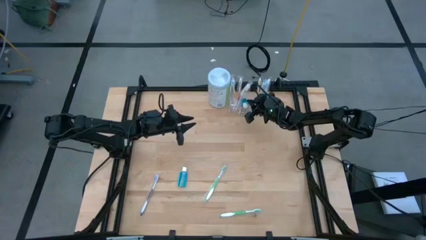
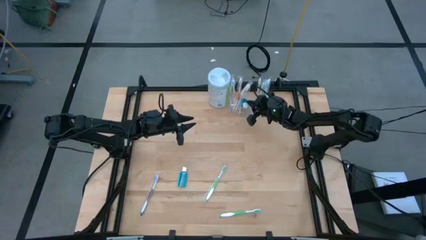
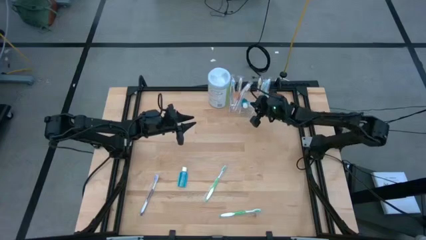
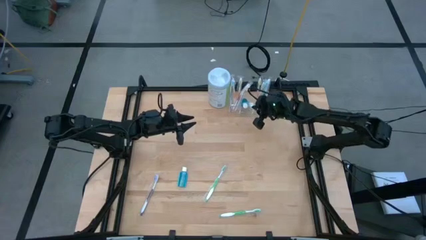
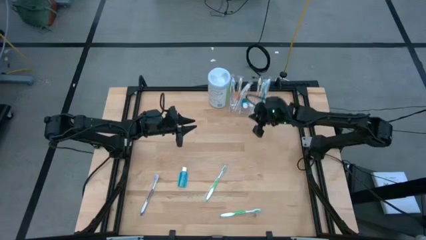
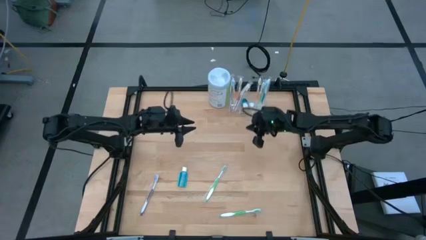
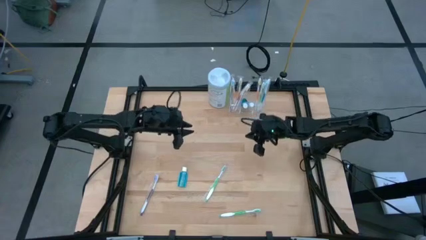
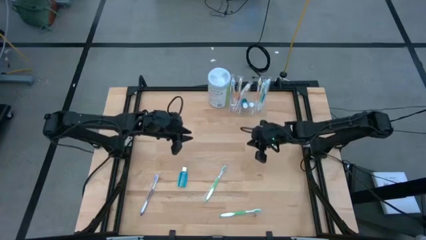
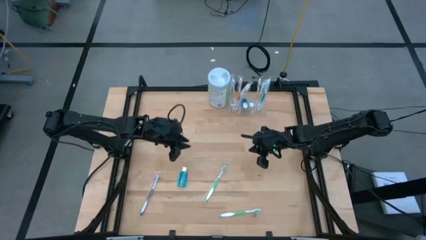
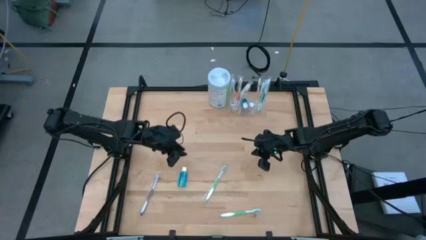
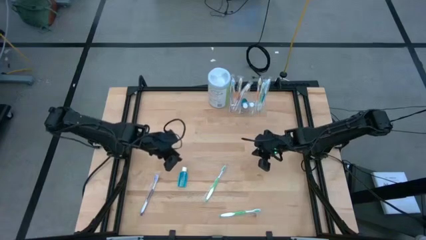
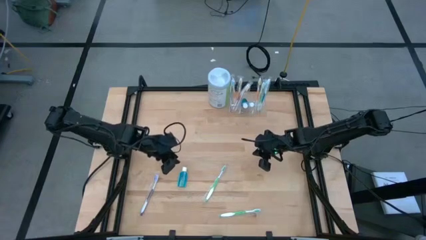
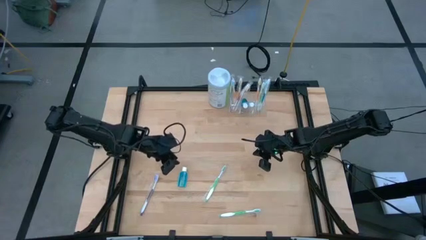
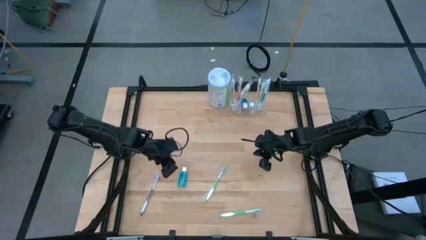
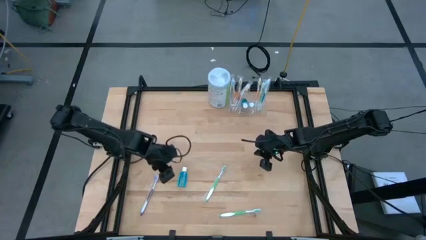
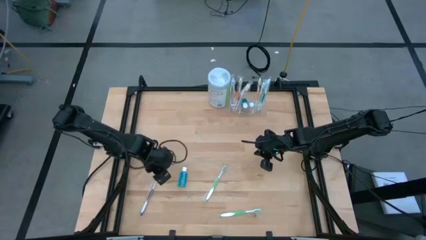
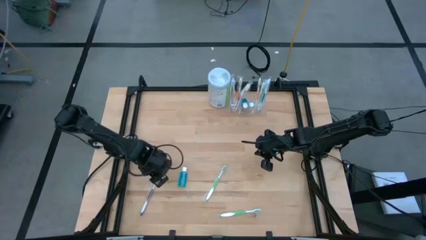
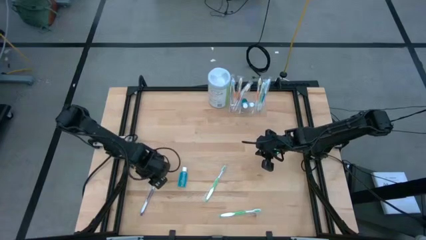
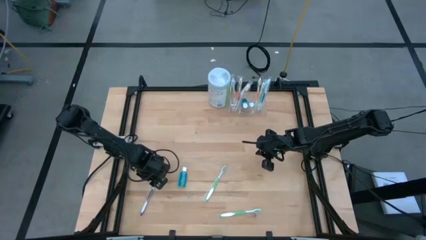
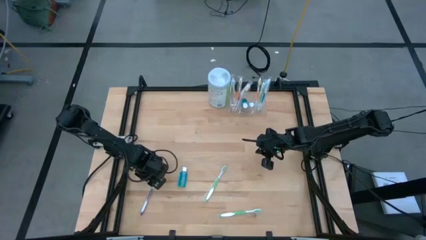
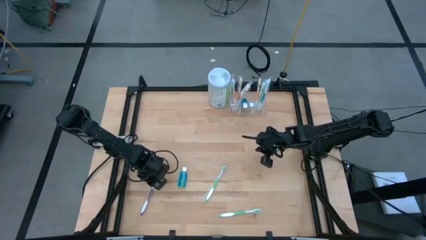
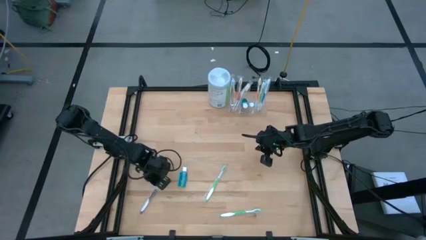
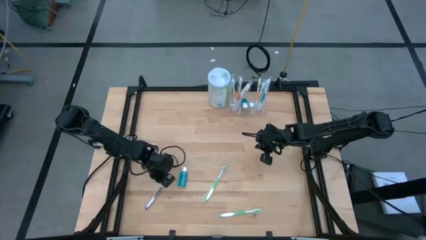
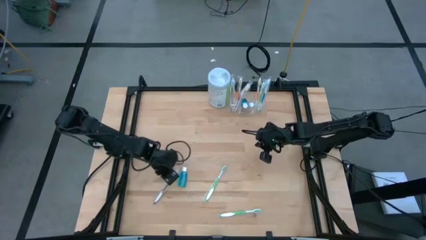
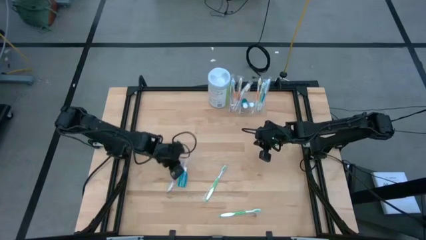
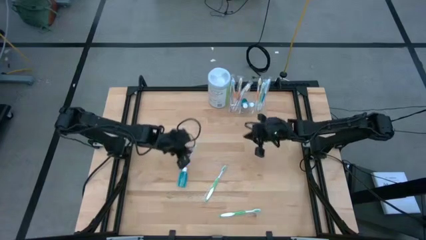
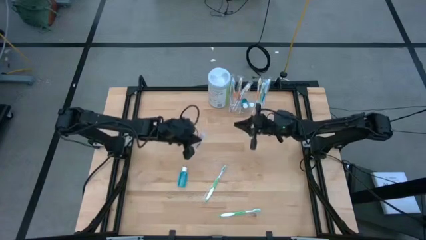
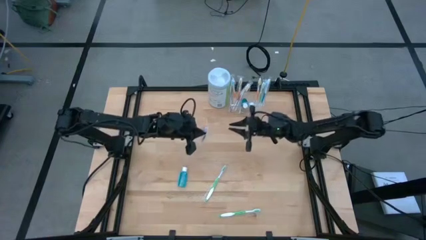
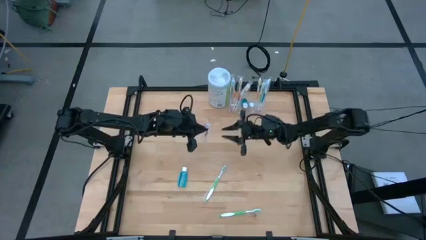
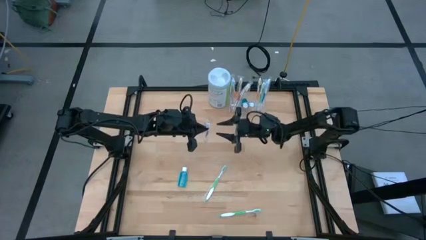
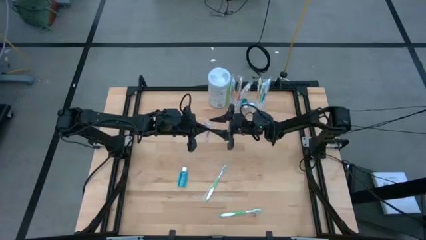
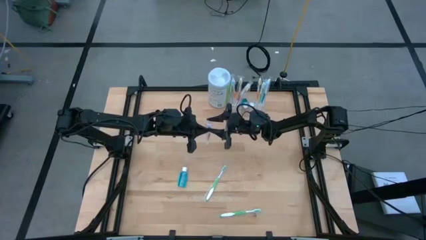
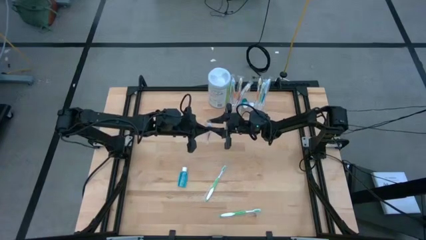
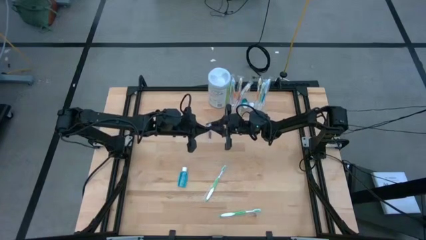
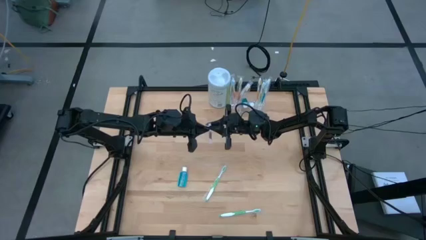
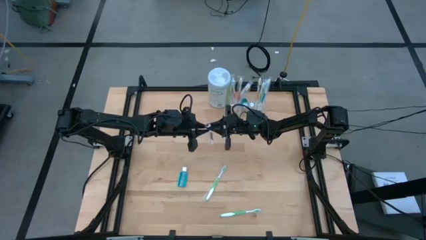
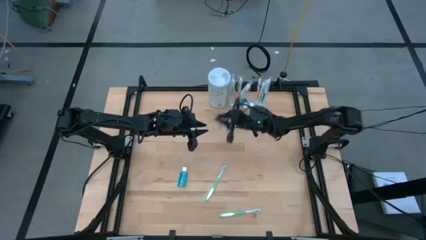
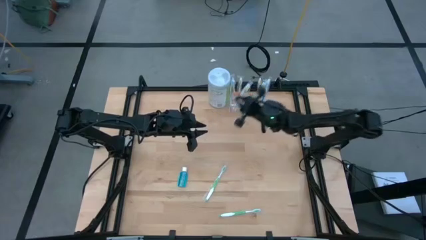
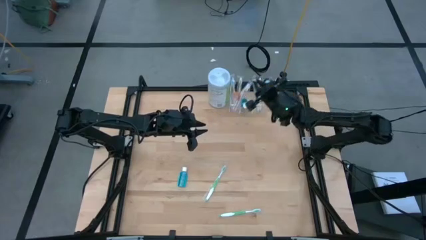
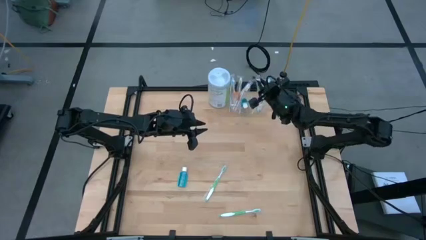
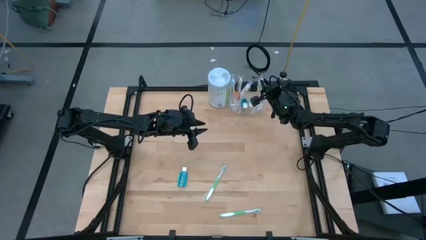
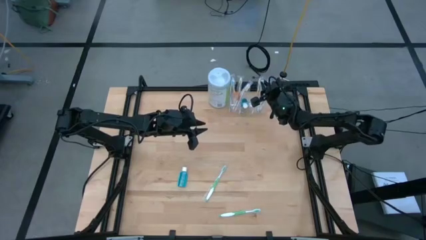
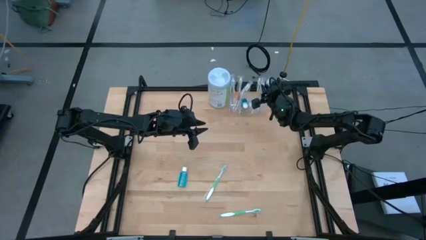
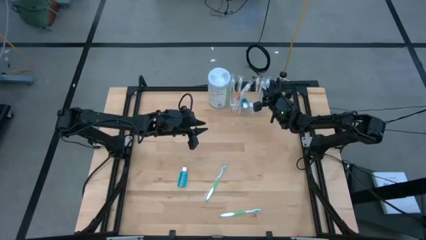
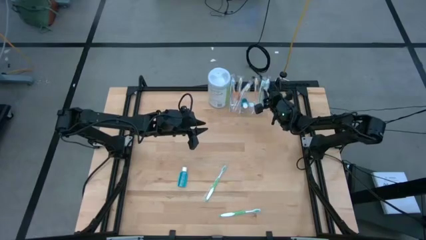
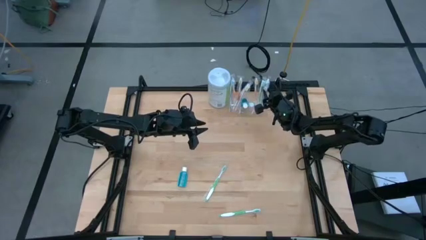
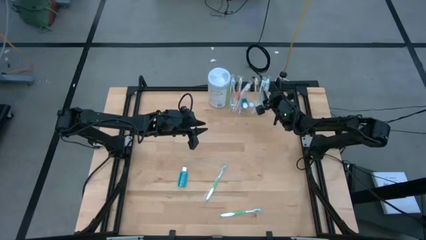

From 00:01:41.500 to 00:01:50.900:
Task: Pick & Place toothbrushing station
Put the purple toothbrush into the transparent organizer

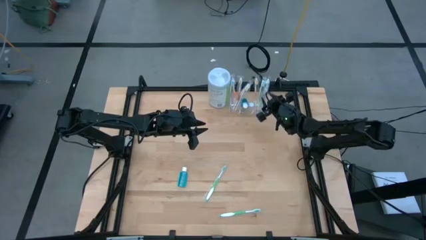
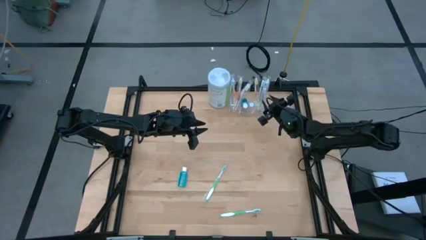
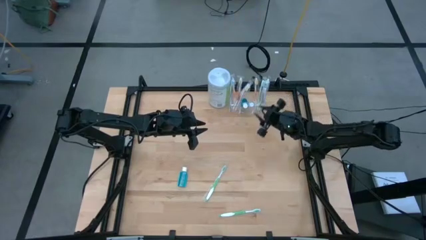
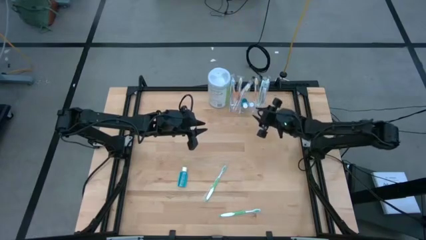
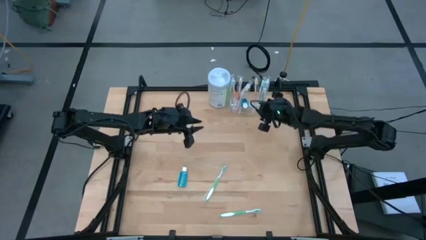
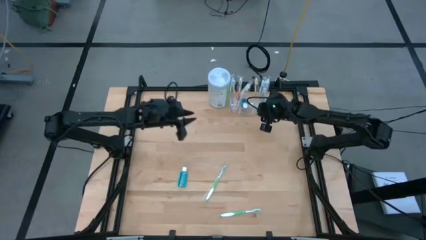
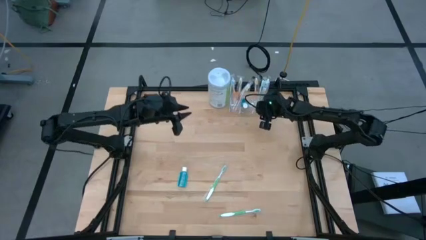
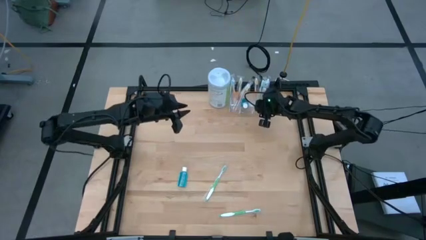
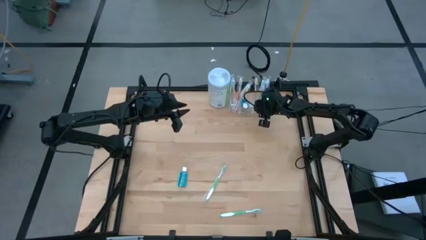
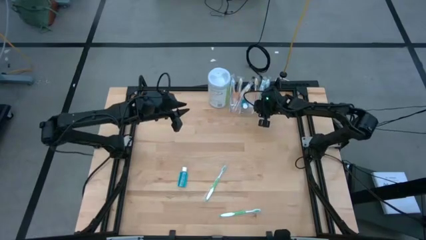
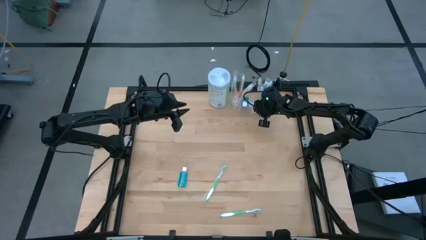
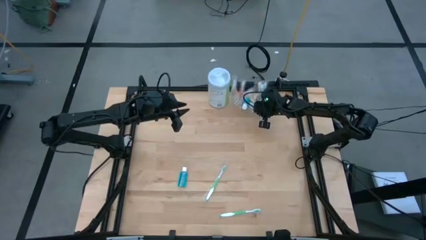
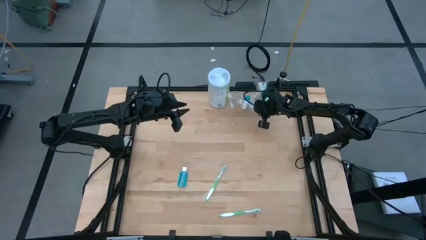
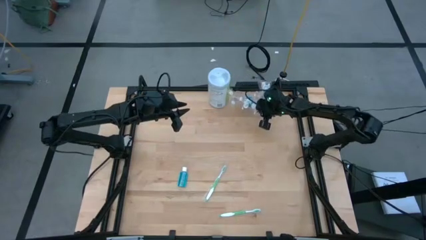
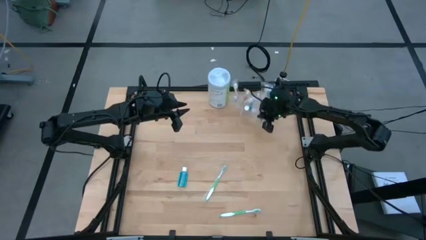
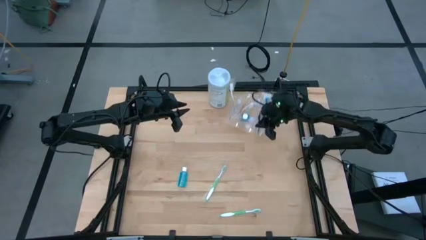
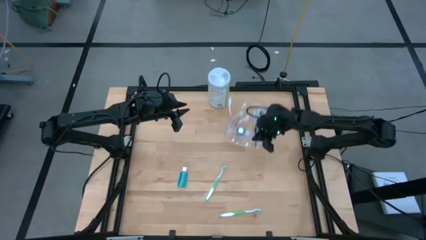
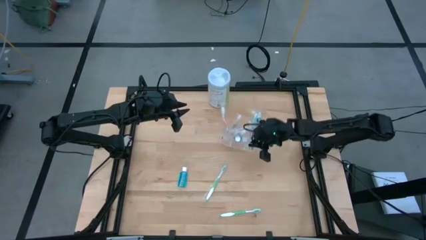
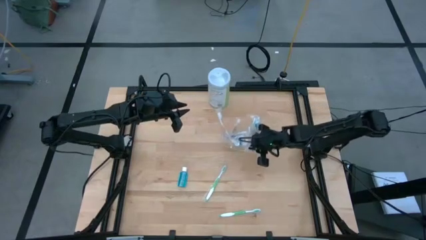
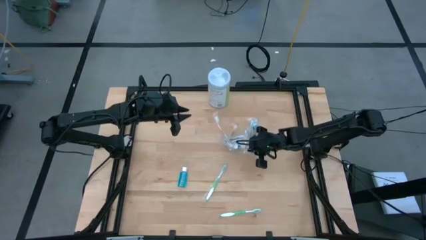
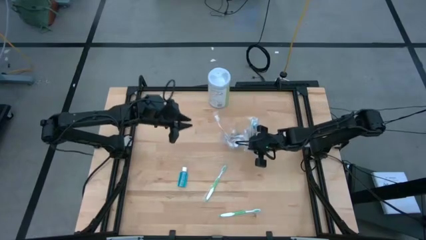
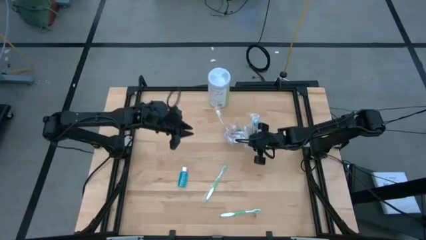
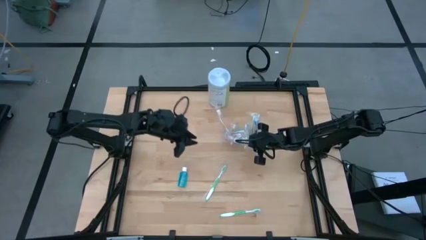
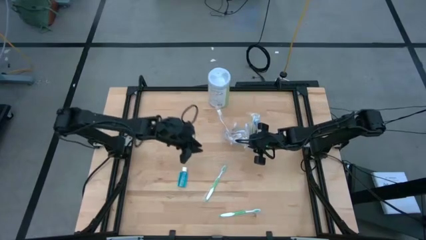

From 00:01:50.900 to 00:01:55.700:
Move the transparent organizer to the middle right of the table

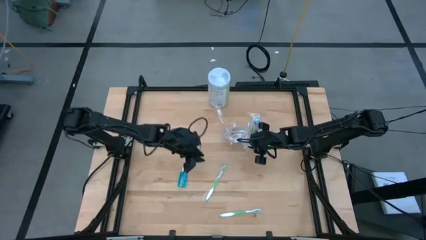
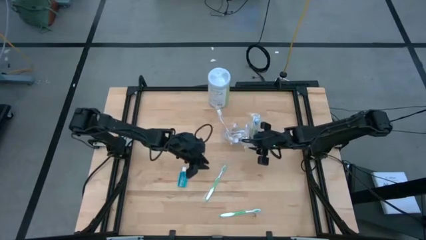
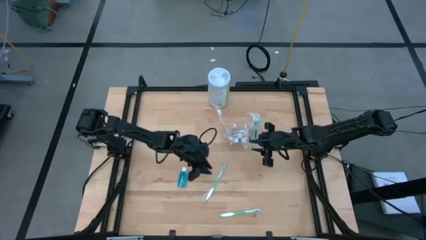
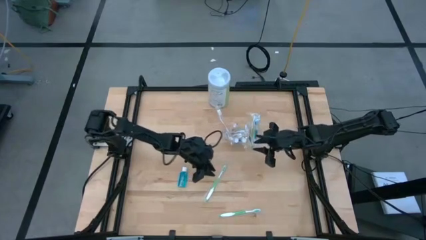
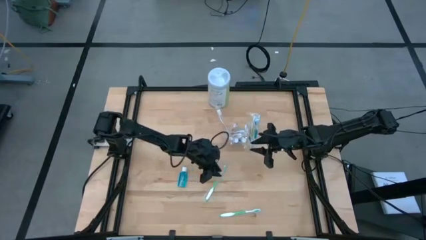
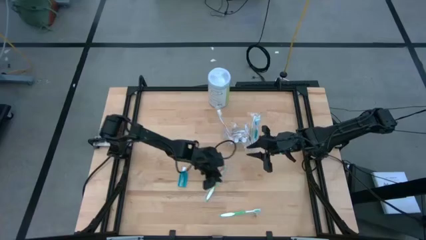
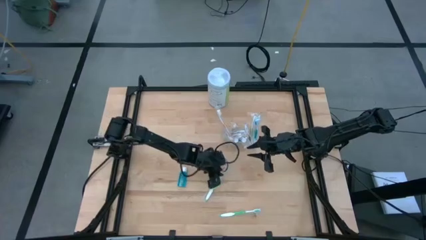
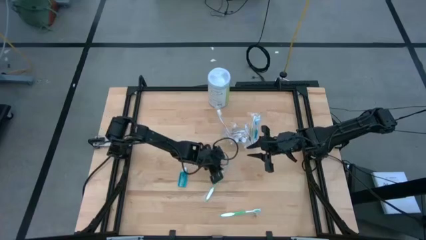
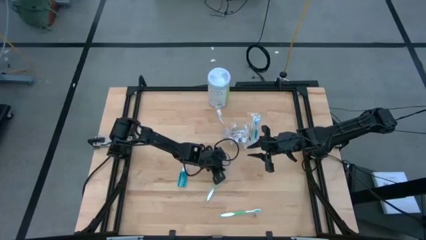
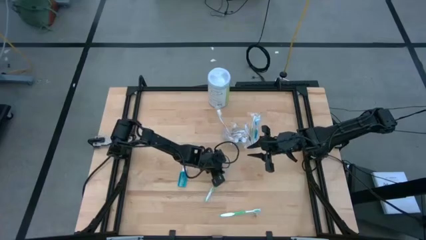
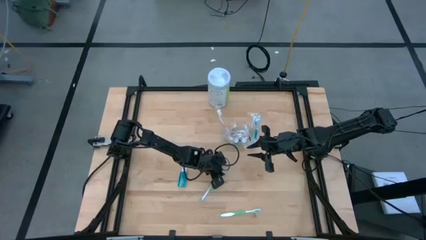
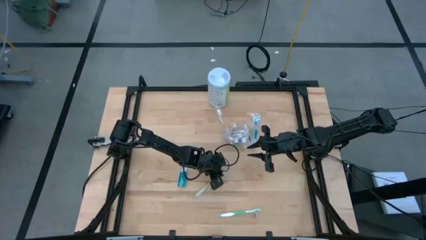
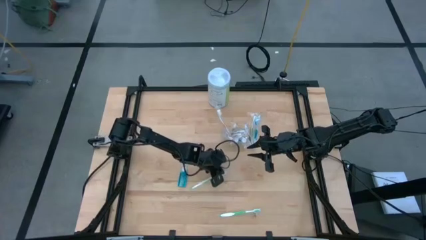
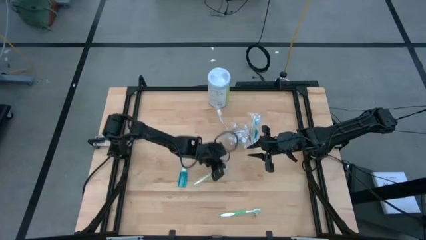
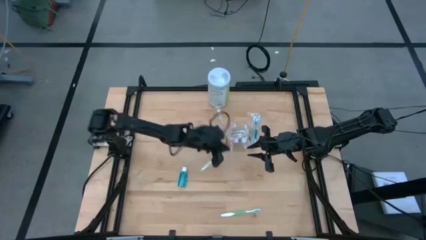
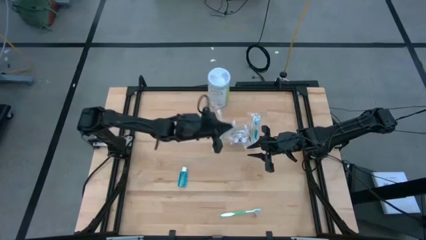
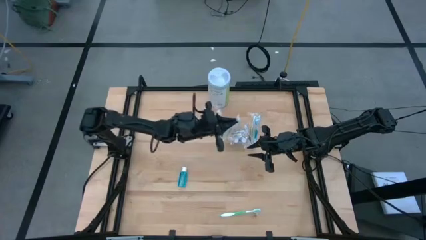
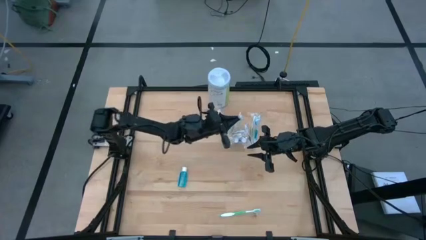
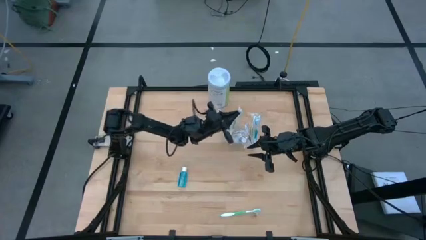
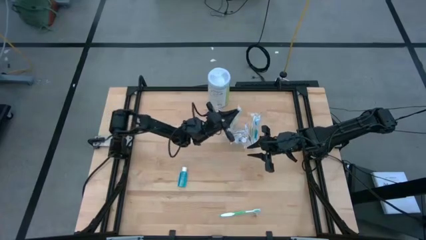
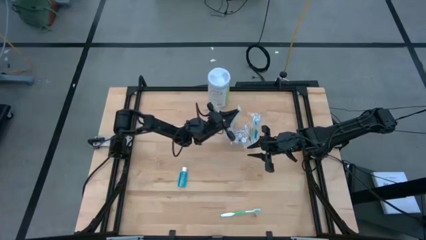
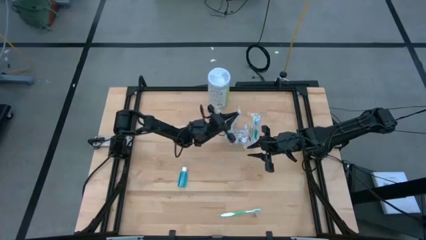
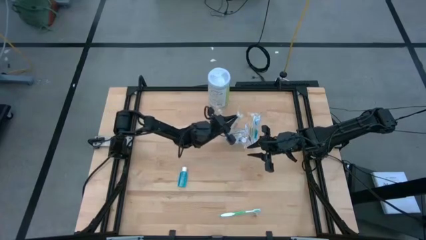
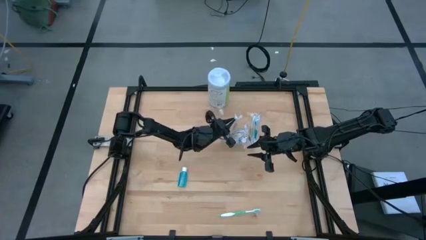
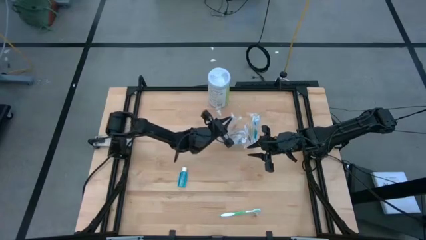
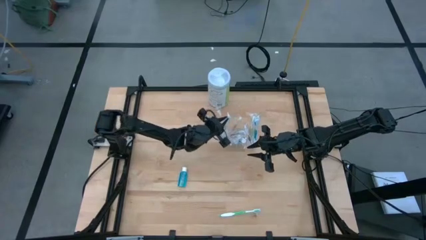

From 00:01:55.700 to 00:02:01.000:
Put the green toothbrush into the transparent organizer
